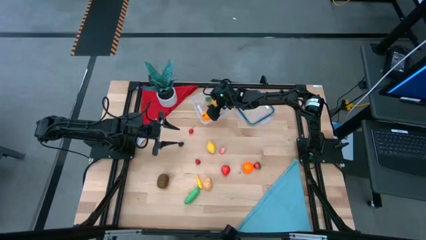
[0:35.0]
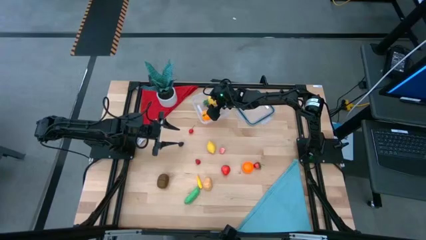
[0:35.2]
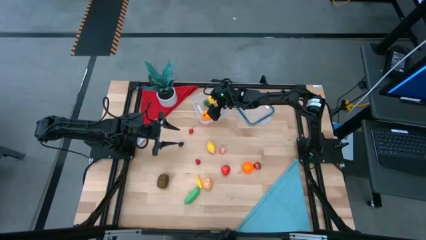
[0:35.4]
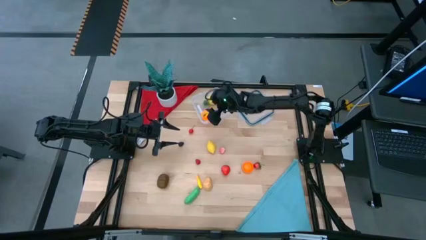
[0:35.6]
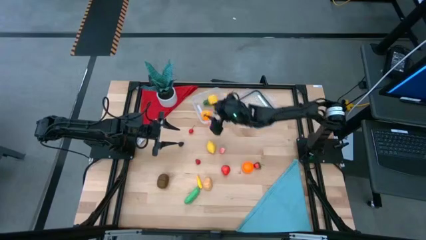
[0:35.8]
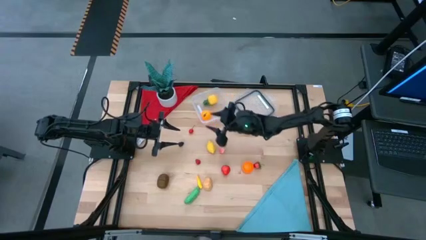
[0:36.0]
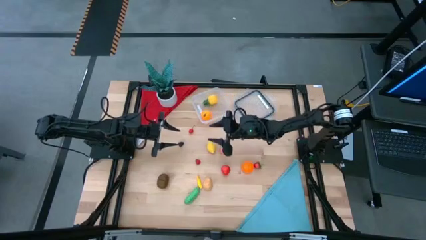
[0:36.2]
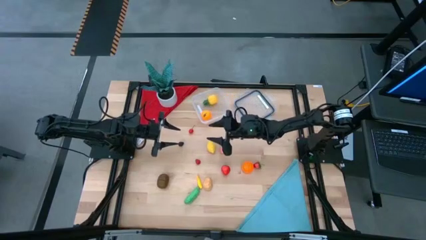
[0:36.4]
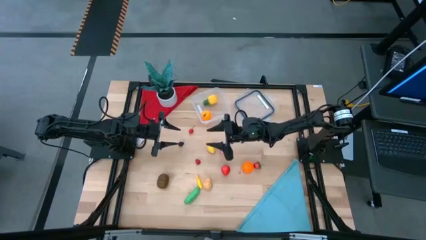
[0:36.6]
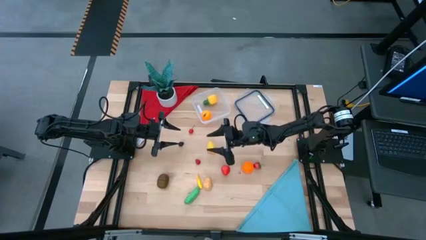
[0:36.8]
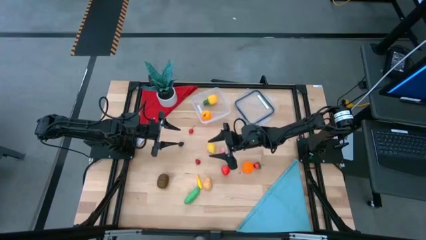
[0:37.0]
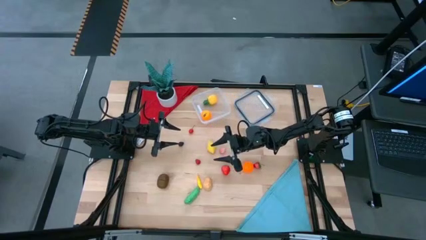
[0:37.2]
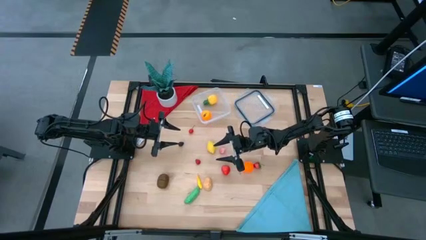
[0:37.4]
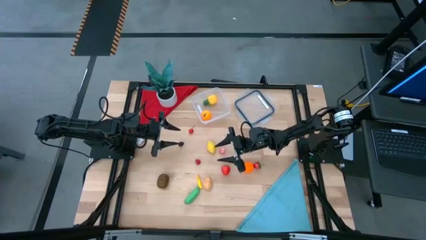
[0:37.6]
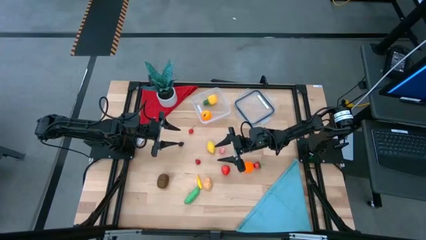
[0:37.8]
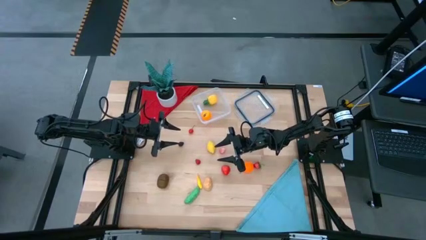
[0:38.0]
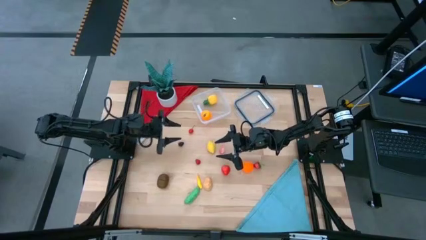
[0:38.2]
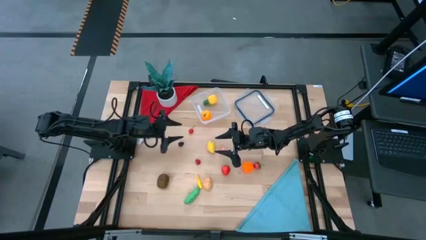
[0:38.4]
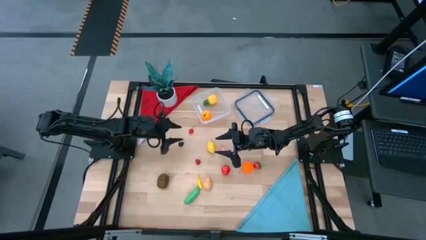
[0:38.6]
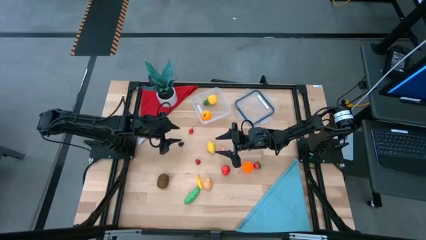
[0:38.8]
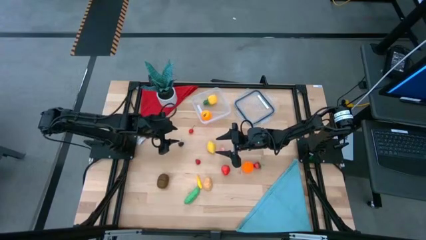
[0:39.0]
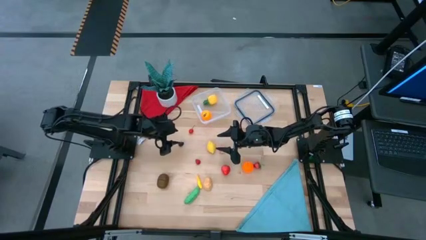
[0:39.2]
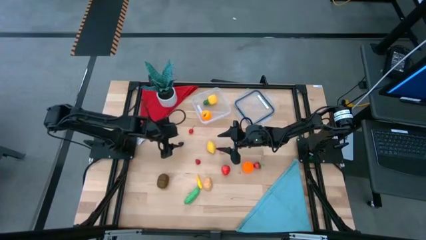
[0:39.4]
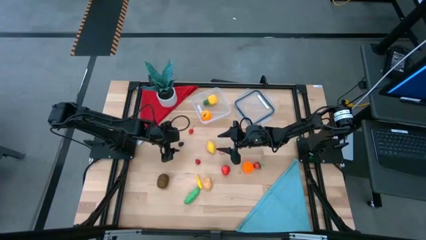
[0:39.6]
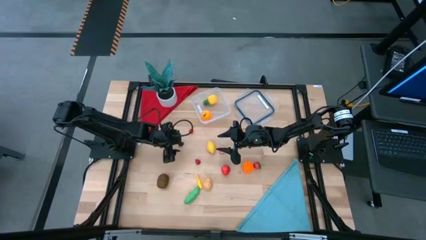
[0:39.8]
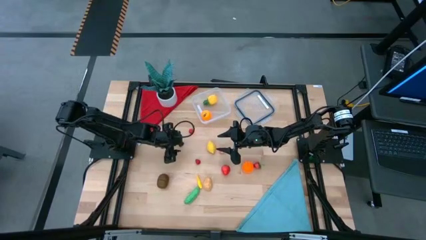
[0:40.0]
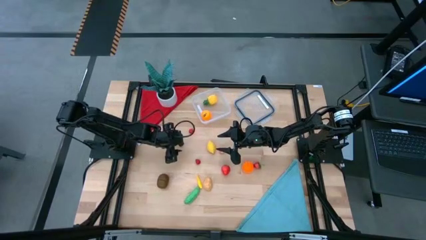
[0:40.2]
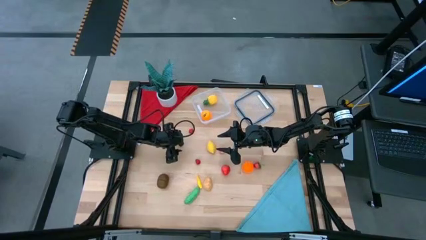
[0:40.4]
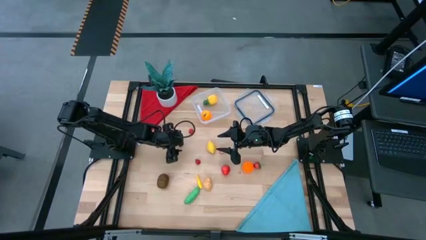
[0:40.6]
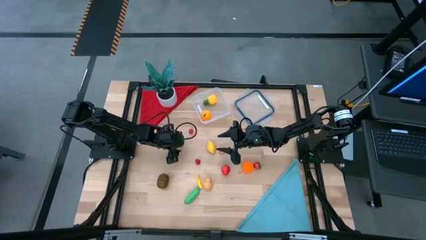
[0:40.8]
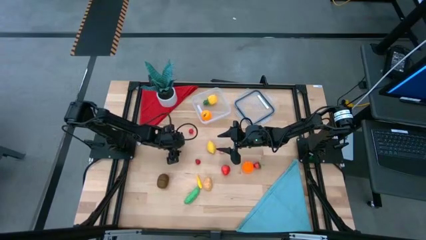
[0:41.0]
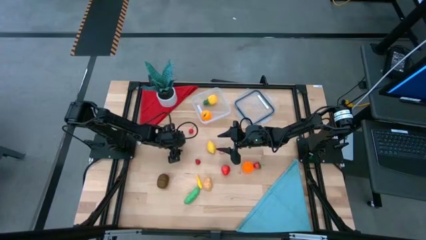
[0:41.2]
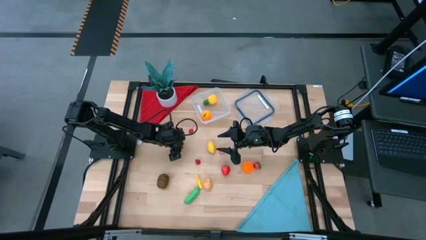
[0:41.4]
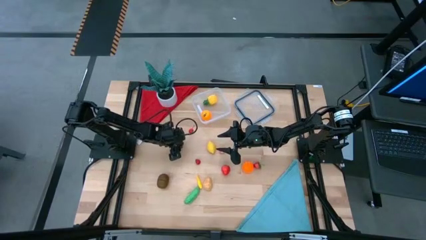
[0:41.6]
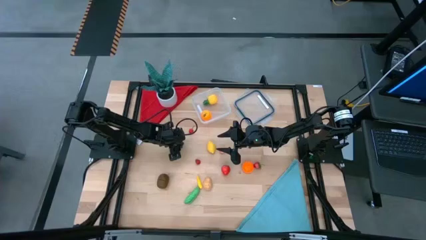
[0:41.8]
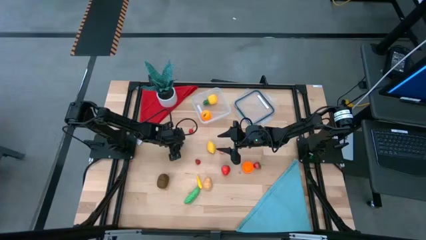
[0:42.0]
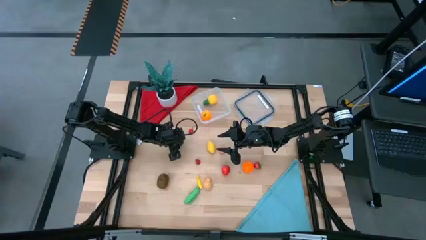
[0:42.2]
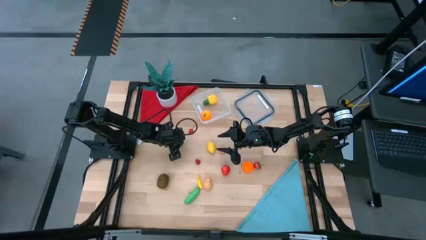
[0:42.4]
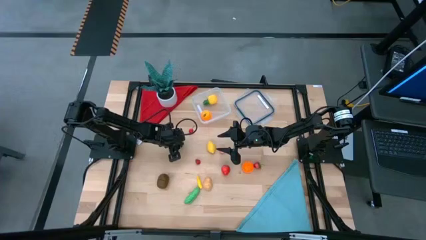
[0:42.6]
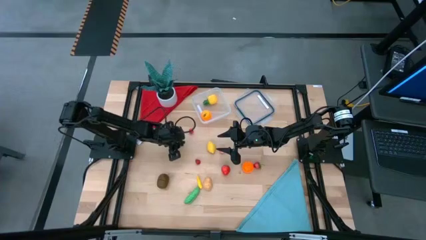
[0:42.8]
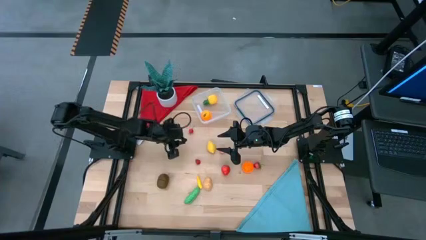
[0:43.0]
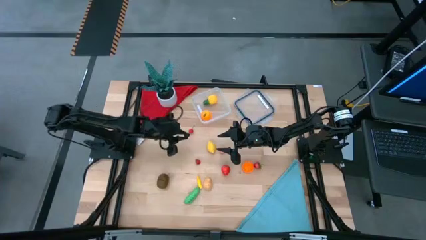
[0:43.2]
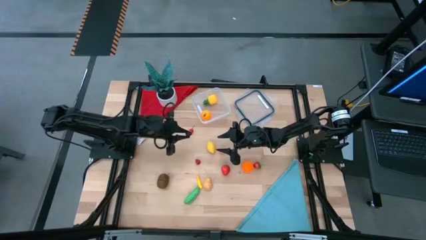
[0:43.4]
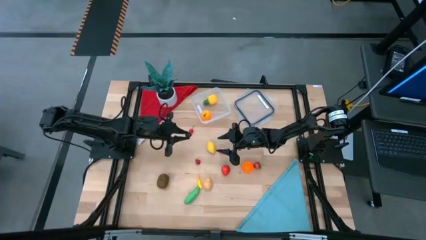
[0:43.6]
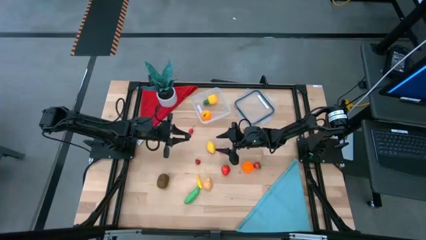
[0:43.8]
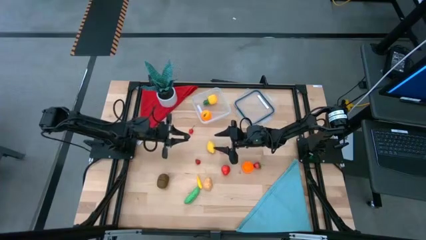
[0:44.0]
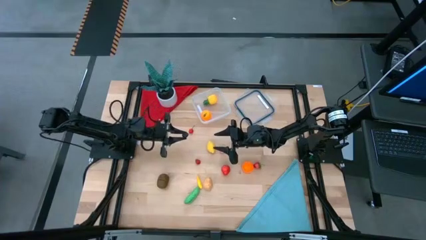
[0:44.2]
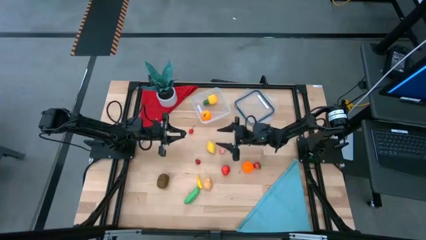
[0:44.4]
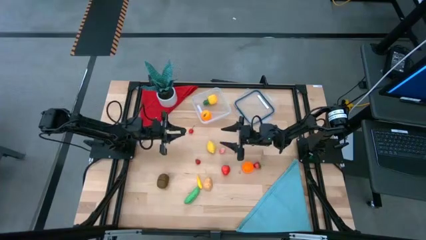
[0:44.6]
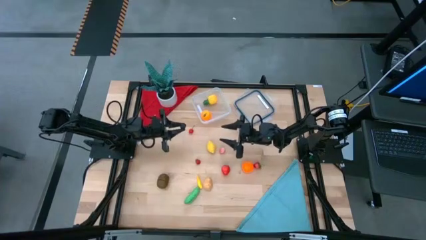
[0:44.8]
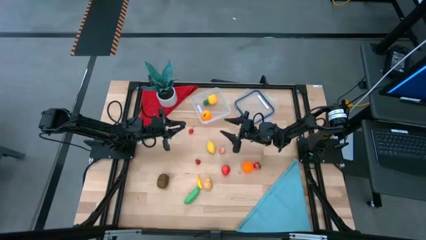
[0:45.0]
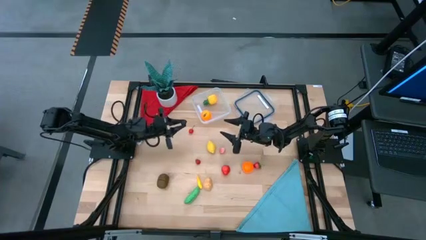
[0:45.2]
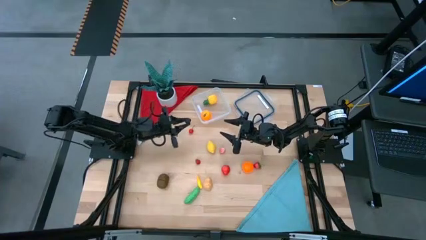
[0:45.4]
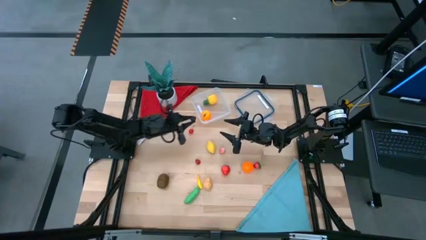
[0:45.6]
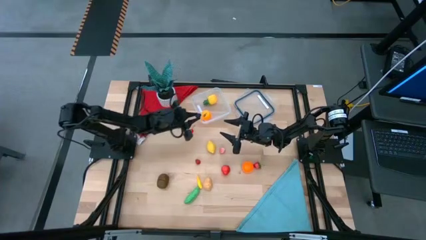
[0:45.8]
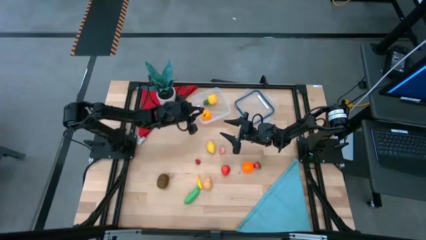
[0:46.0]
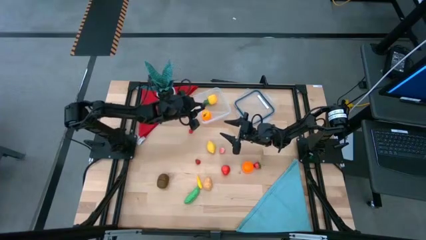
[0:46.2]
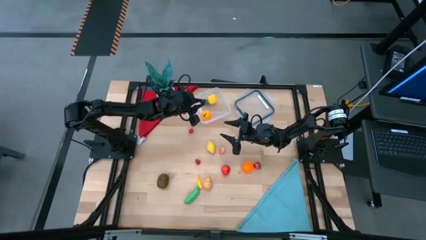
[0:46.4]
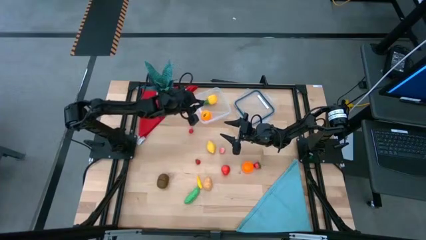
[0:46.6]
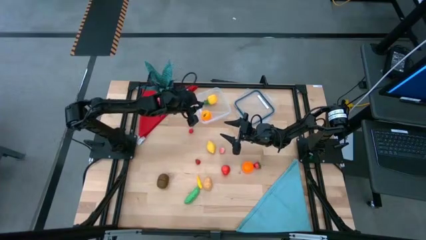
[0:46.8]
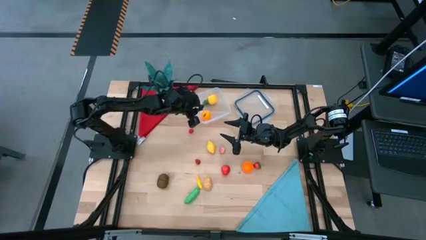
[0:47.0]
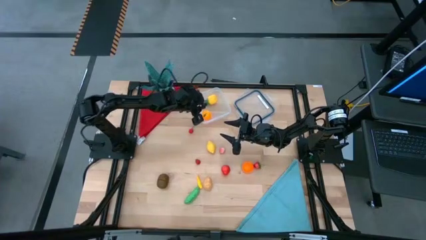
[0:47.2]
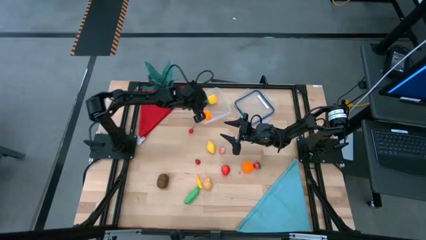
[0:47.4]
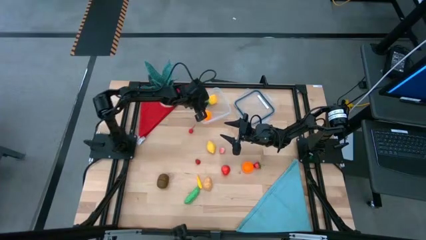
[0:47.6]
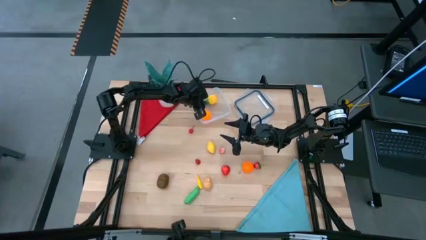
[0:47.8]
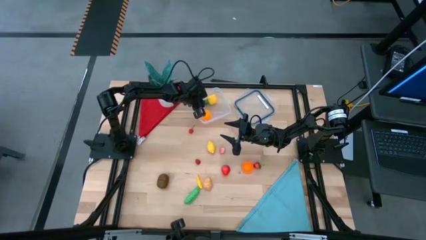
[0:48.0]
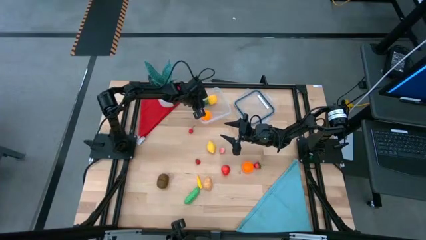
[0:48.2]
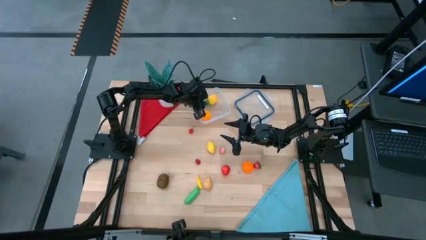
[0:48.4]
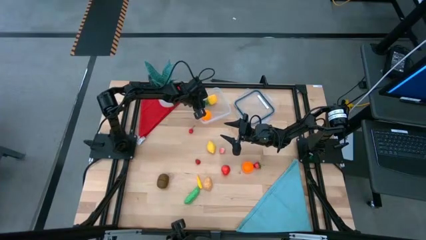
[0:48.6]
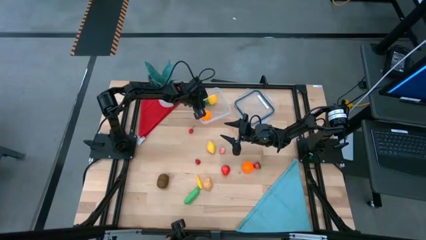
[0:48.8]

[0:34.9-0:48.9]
Task: Pick and placing Produce into tupperware
Put the blackberry into the transparent container

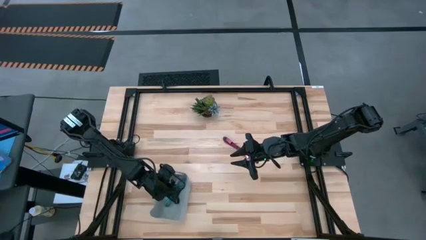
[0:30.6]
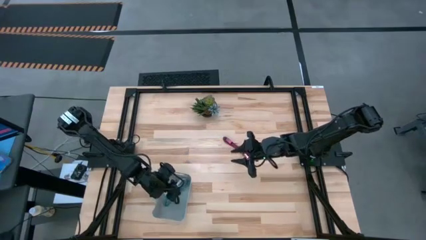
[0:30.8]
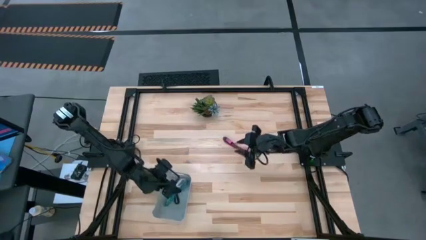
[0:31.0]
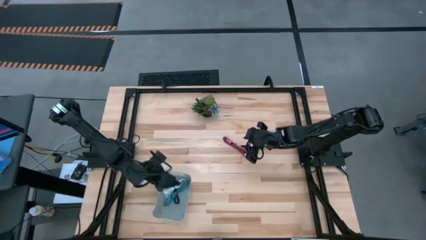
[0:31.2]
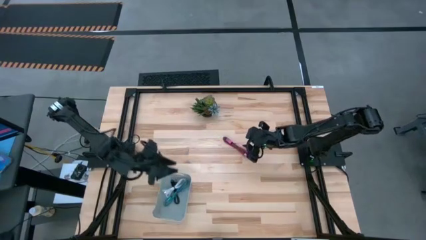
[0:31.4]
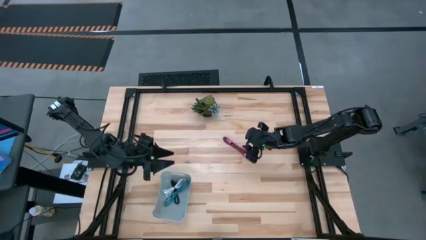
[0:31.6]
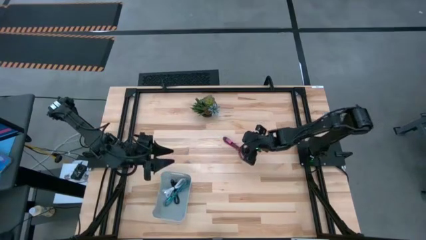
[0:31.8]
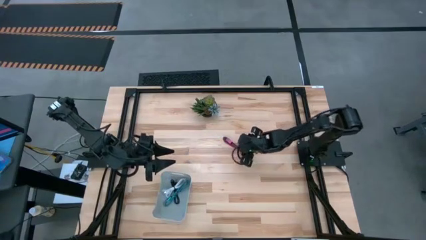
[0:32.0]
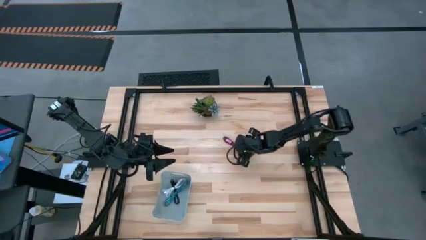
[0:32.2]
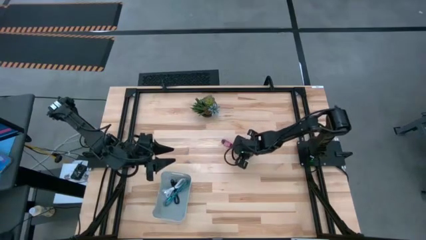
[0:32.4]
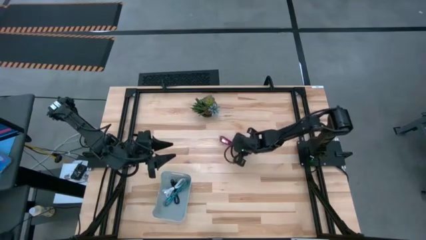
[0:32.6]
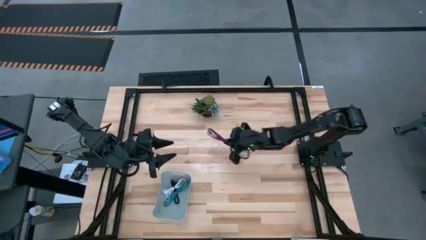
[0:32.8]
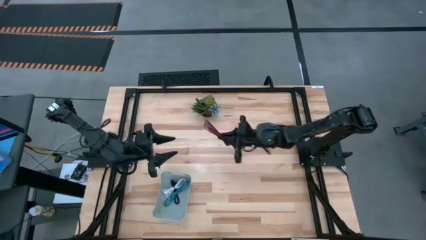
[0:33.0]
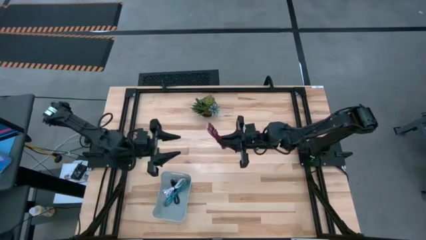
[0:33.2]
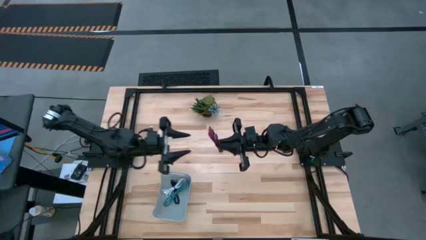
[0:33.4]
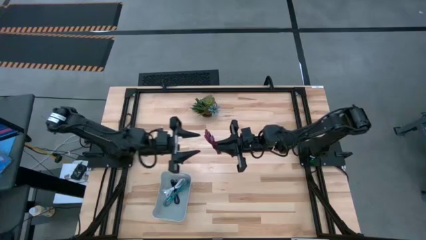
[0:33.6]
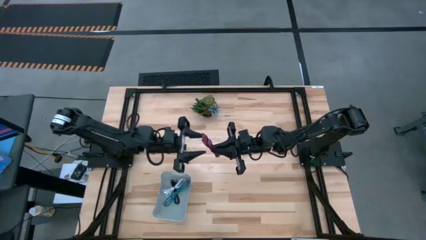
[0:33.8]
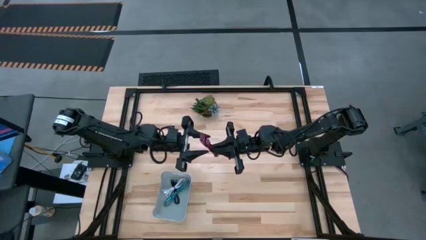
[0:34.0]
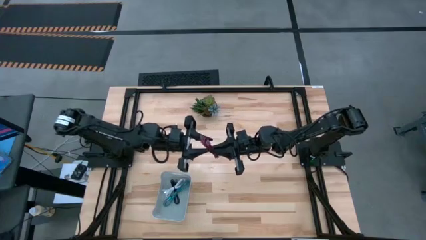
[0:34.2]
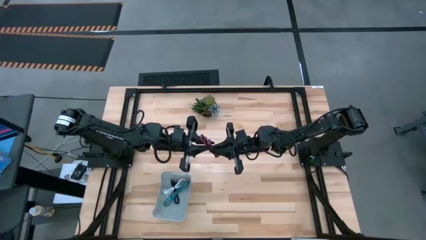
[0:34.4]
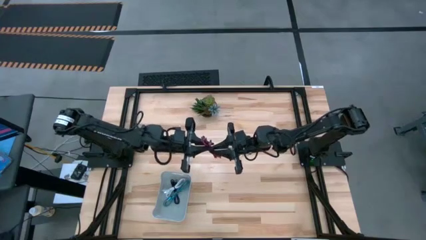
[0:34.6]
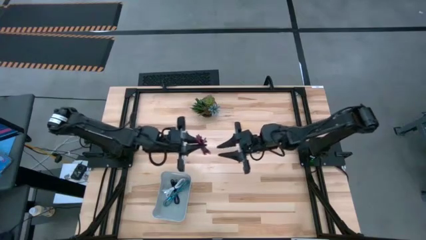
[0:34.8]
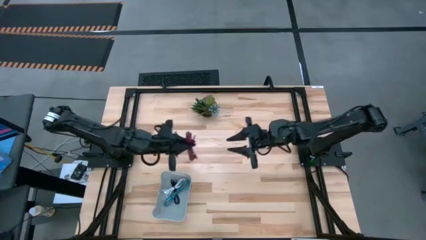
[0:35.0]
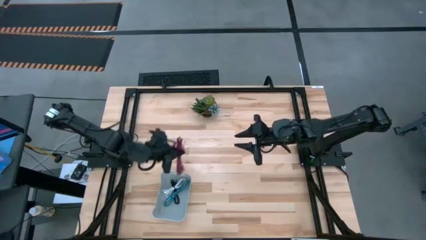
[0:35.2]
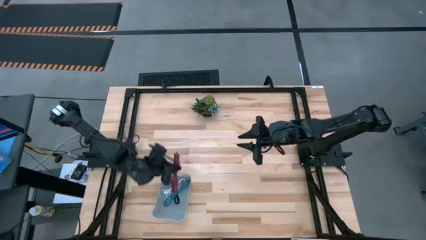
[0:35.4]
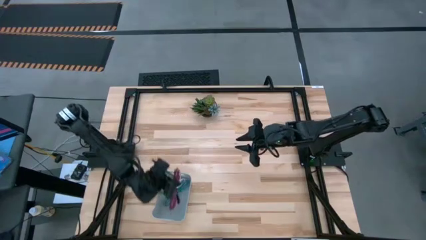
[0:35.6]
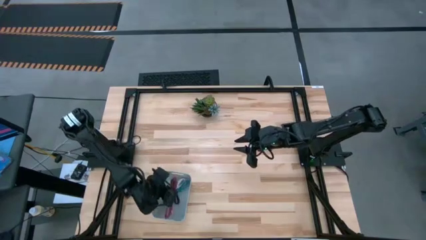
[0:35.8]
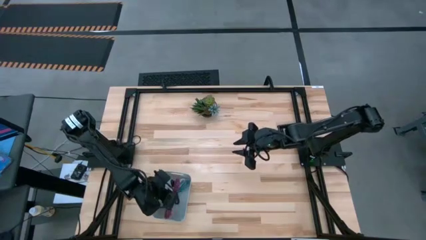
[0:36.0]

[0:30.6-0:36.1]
Task: Pick and place USB-C Cables
Put the pink USB cable into the gray bin
